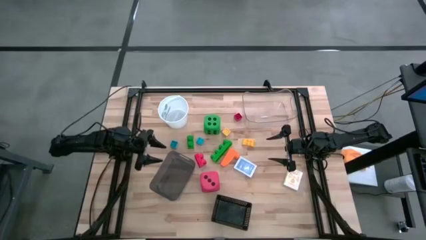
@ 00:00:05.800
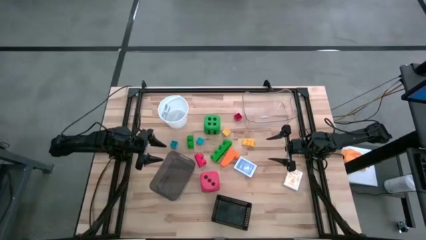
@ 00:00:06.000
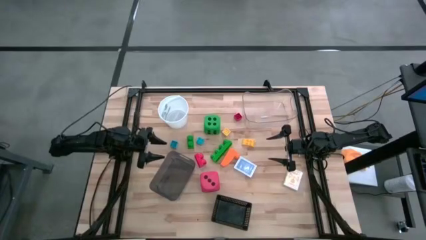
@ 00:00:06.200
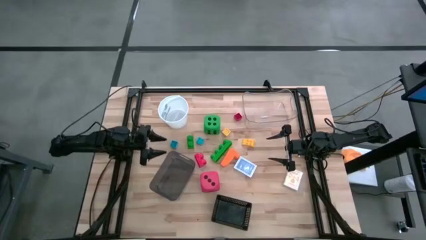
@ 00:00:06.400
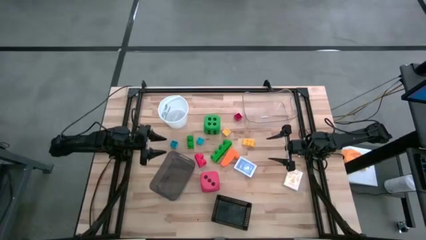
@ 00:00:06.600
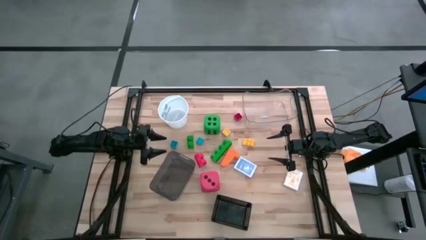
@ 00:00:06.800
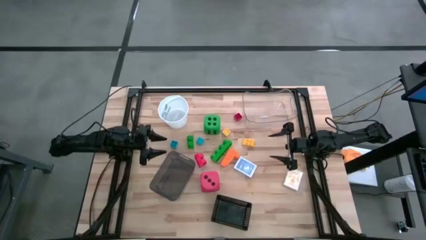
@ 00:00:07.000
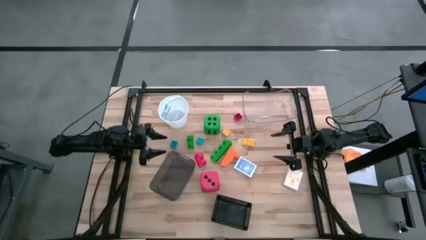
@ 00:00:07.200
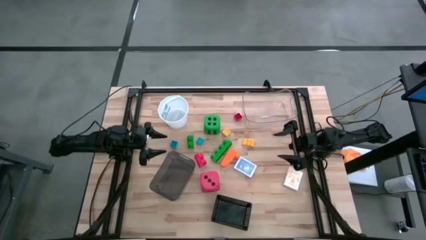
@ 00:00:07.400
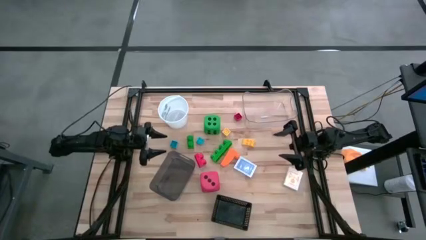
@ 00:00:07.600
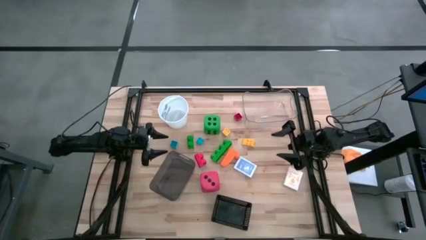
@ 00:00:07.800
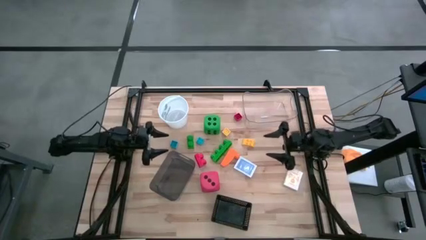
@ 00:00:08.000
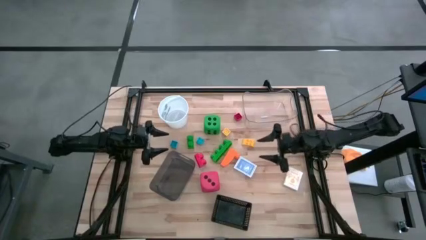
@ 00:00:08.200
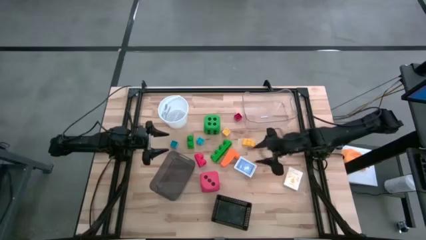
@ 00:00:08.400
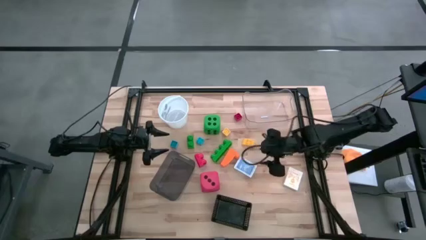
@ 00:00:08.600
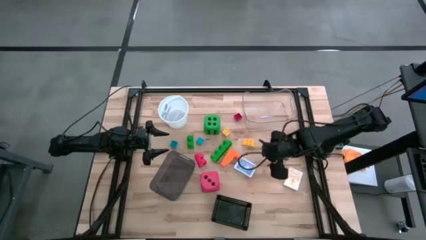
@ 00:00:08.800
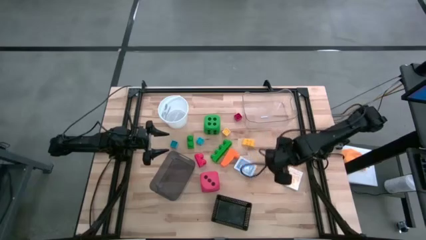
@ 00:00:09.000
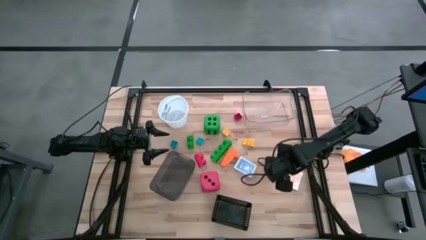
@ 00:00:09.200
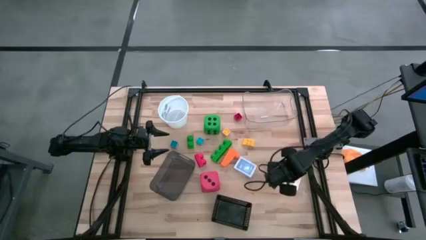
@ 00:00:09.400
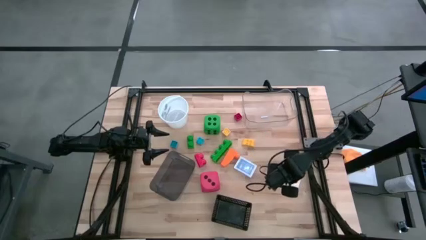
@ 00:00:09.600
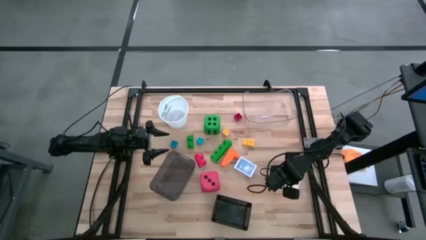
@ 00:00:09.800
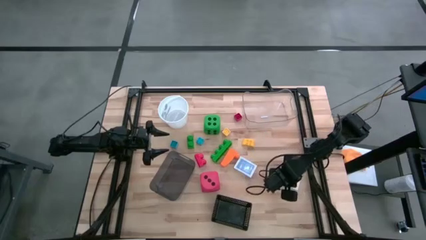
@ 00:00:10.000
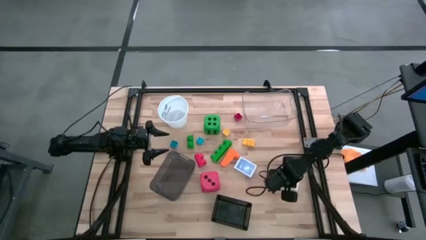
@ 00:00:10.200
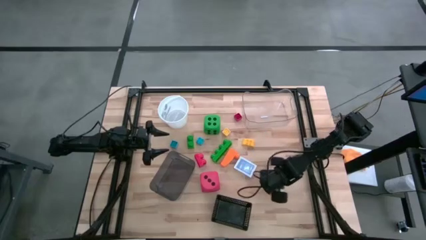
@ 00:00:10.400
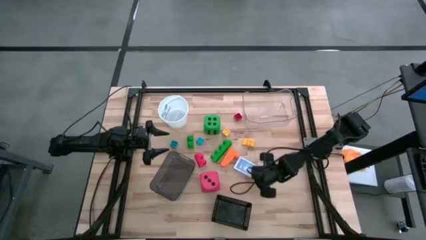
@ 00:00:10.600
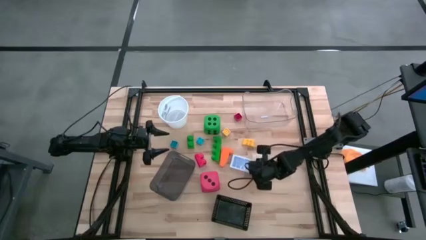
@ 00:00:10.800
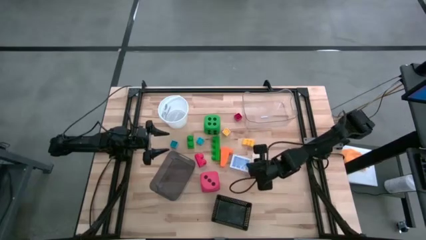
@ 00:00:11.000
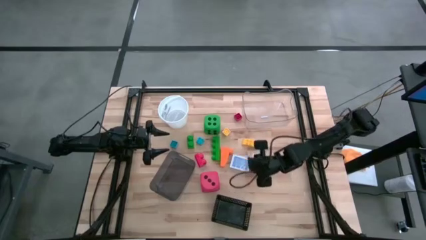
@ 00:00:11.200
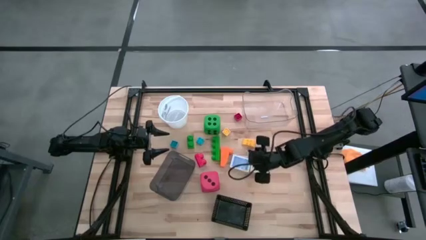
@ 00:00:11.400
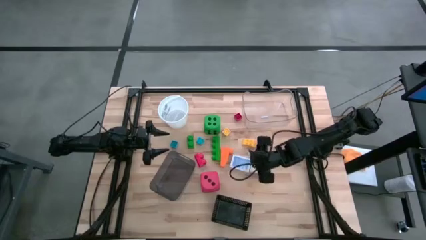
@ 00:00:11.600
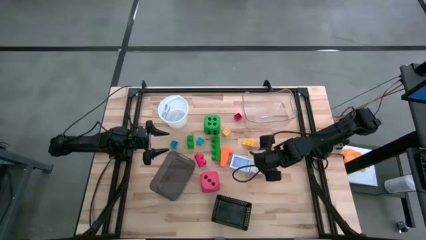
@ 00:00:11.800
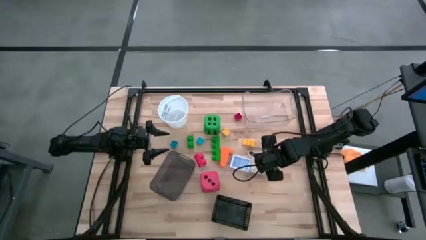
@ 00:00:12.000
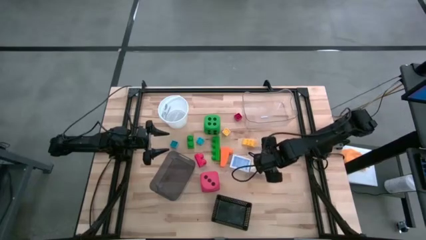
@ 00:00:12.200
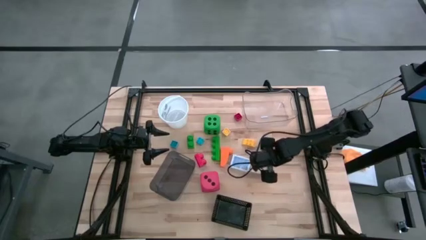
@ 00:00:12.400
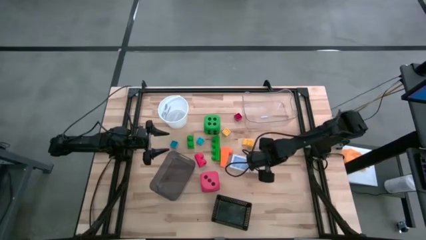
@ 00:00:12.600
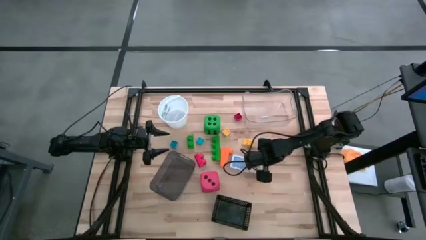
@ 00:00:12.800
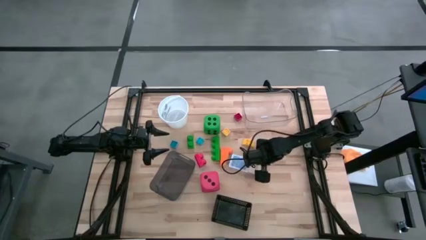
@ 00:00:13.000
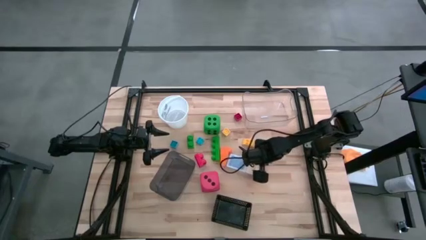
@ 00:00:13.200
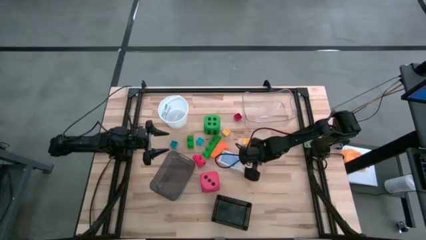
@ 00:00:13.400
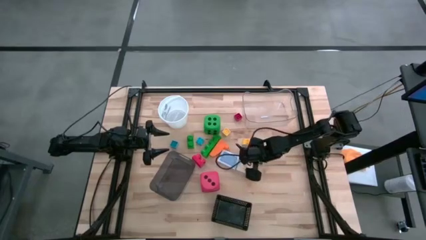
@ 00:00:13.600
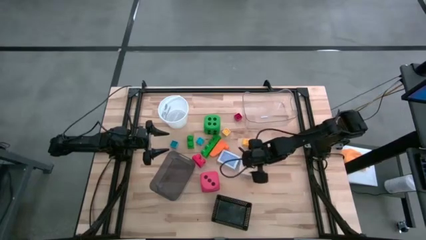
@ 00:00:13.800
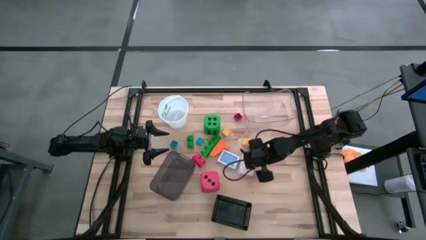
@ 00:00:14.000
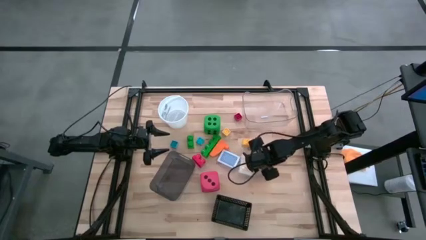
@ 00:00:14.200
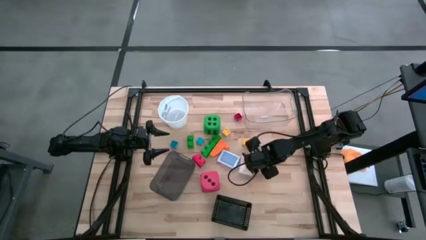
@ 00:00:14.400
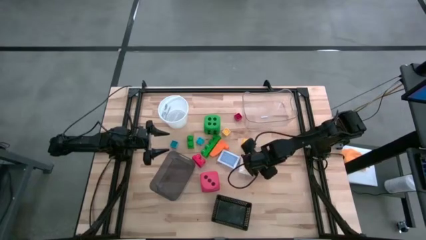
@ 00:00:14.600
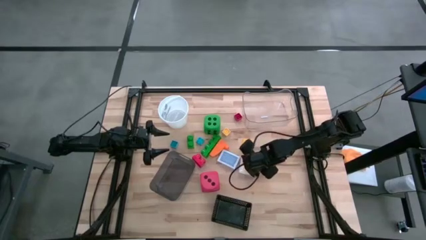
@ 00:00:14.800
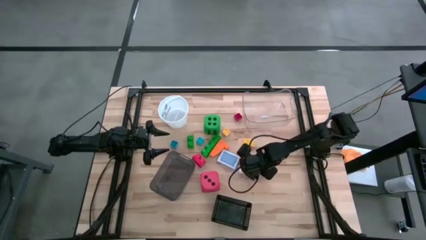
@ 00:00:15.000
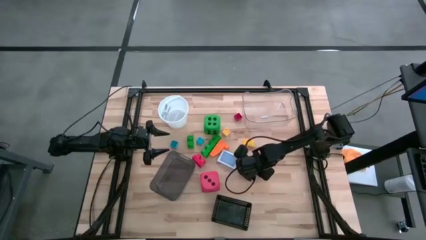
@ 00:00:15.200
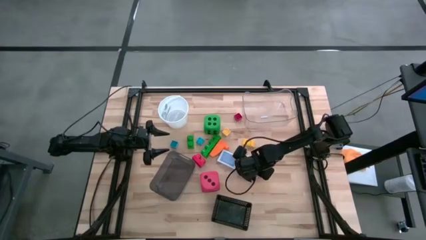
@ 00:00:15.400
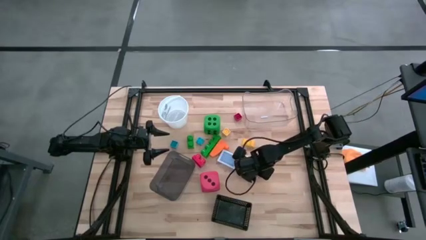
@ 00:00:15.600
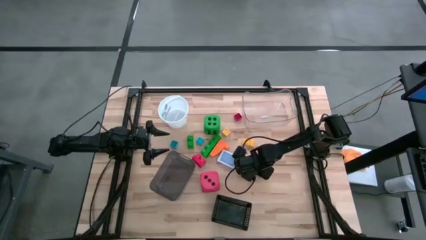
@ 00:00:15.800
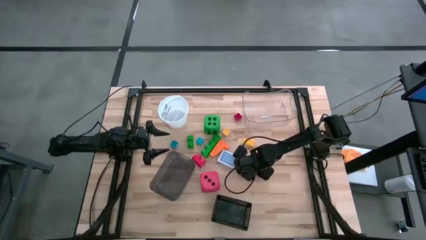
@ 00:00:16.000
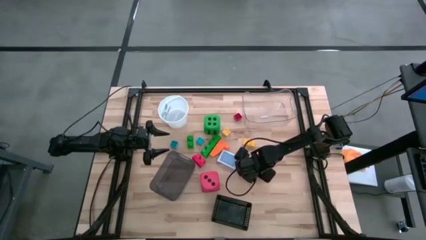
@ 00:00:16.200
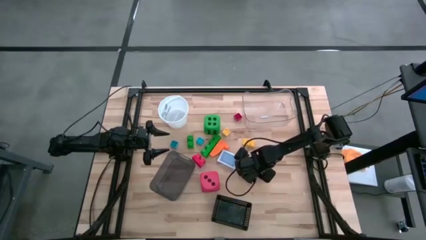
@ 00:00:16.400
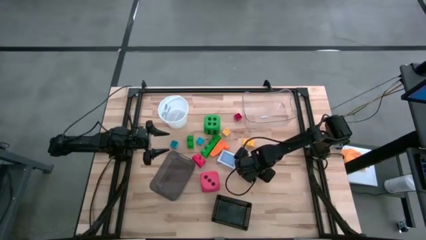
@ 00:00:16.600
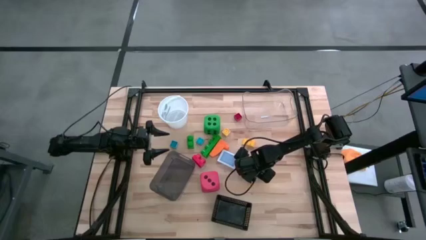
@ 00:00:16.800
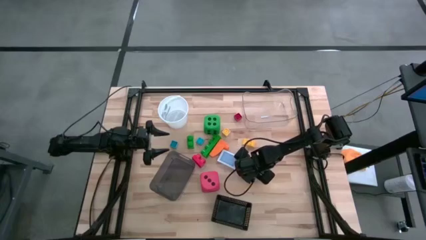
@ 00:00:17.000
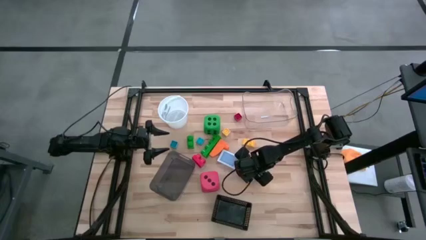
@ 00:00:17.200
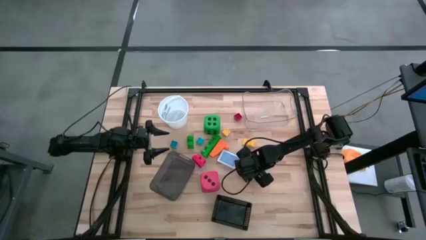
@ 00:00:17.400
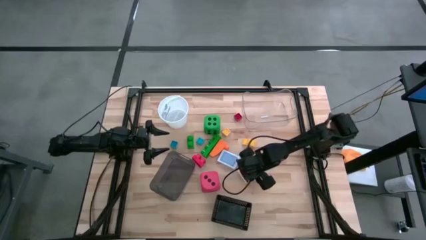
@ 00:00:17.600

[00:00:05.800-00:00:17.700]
Task: Pick & Place Toys
Put the yellow deck of cards into the black bin

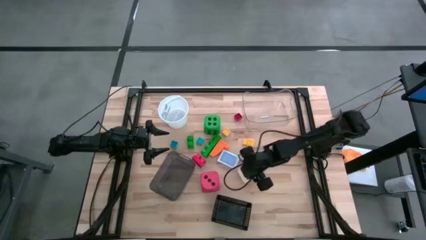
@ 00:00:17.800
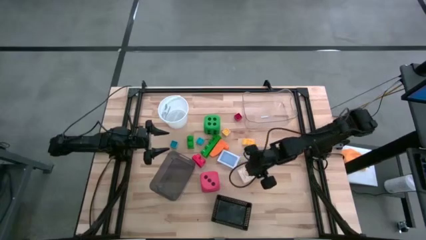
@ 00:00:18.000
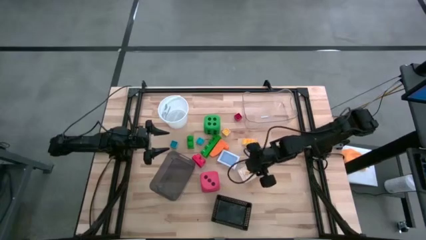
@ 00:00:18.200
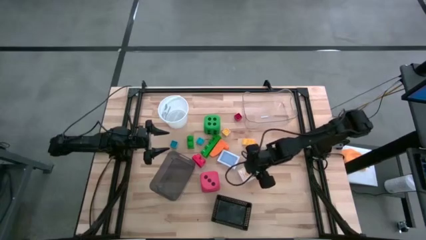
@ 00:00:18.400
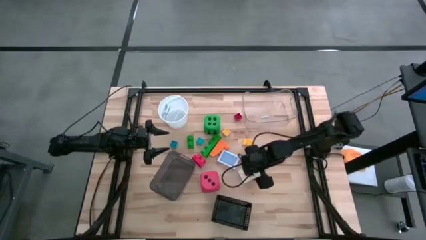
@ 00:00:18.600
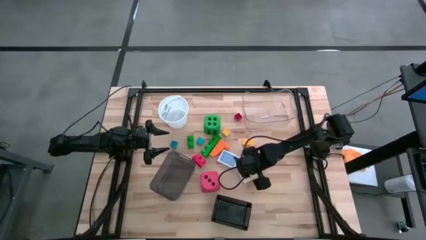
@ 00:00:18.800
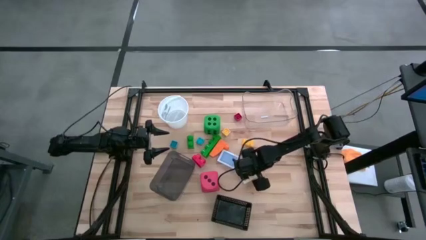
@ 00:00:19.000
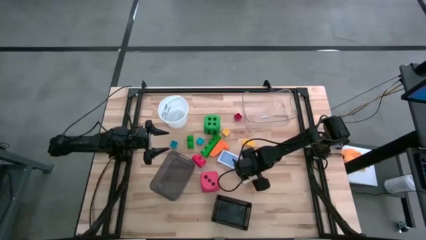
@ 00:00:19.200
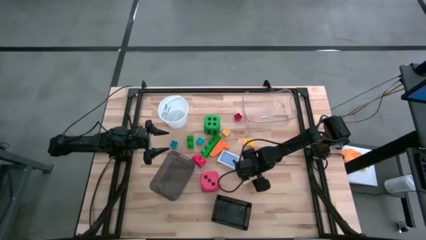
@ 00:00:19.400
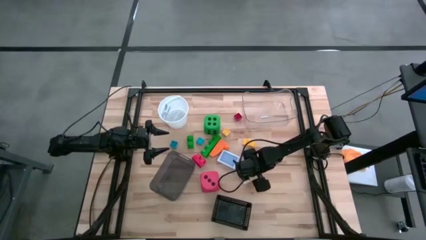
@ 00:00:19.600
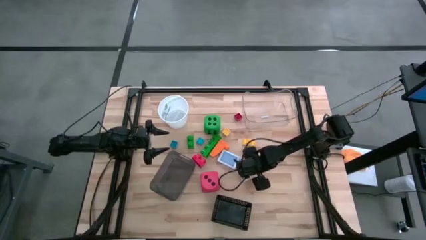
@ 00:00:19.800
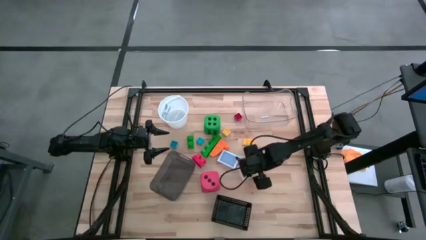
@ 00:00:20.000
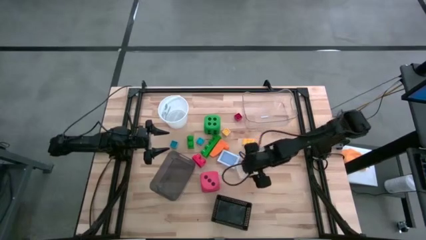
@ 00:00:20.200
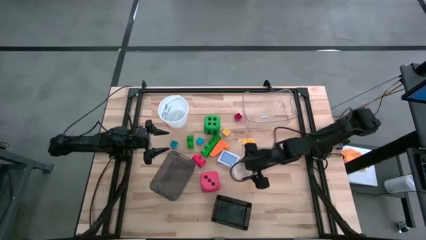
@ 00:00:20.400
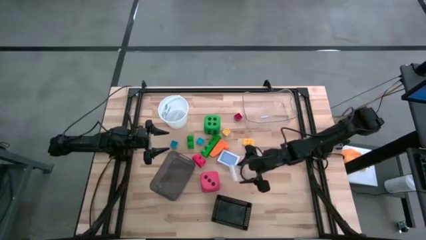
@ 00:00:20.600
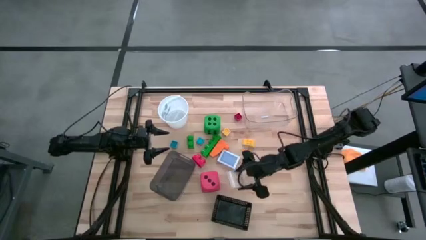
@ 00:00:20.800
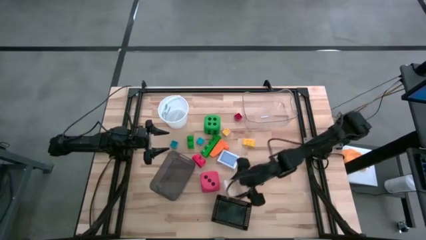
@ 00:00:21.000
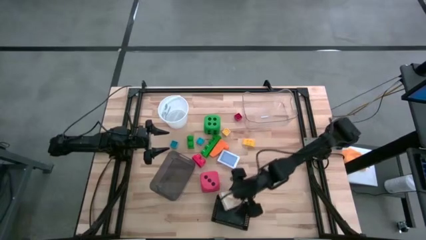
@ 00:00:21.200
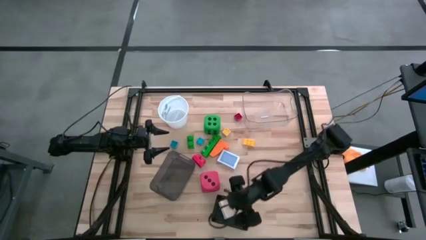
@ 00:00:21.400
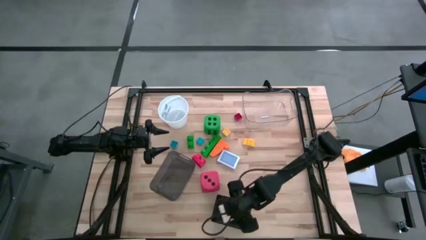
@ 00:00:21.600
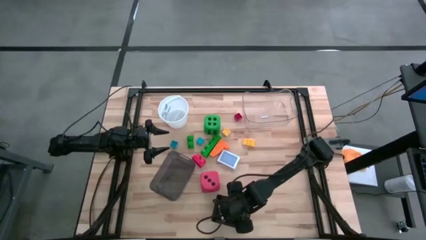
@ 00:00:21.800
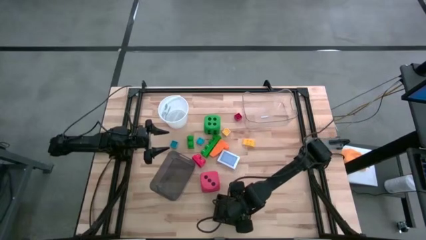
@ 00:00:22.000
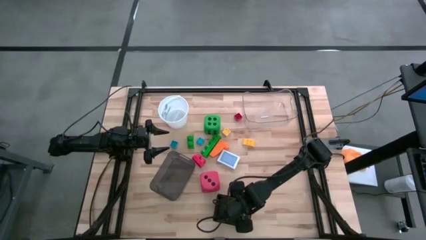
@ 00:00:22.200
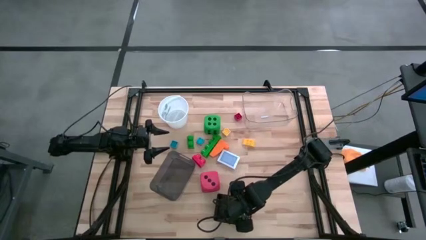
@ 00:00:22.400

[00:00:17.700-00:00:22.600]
Put the yellow deck of cards into the black bin
